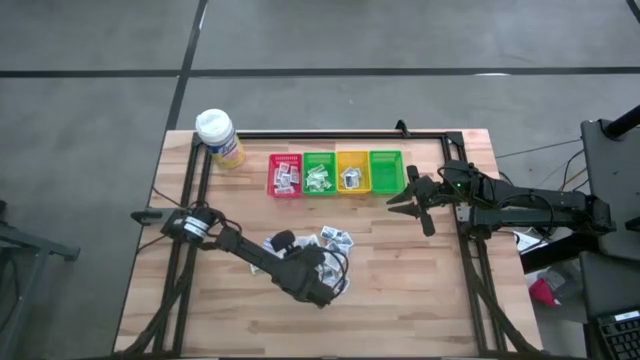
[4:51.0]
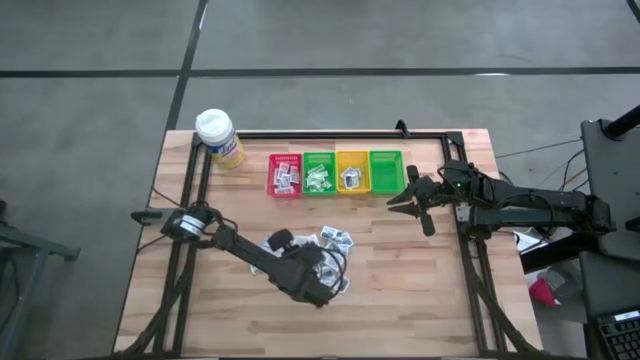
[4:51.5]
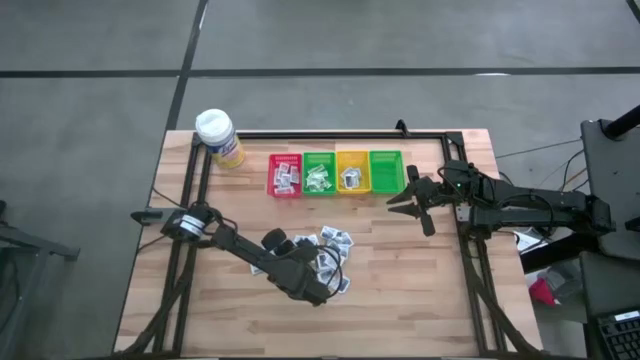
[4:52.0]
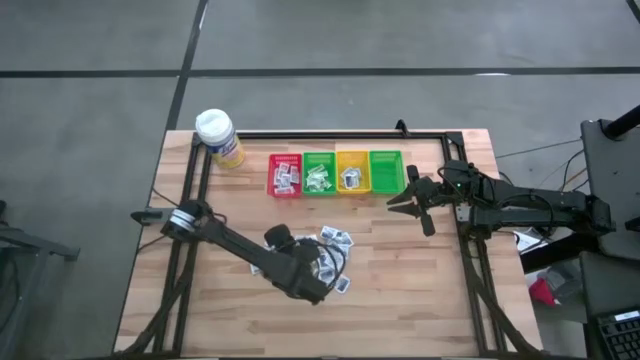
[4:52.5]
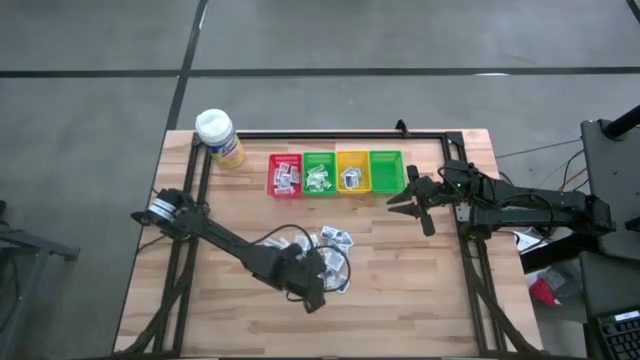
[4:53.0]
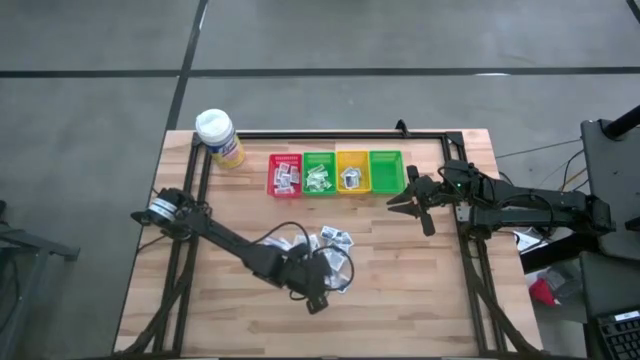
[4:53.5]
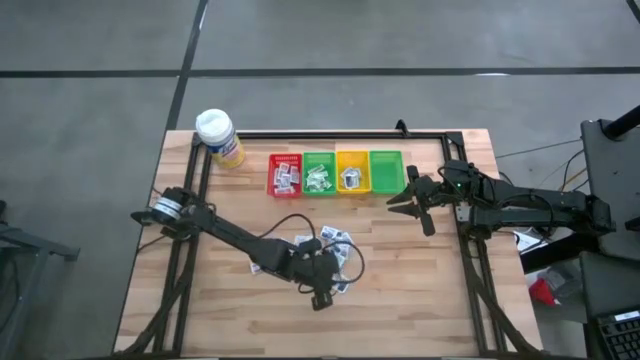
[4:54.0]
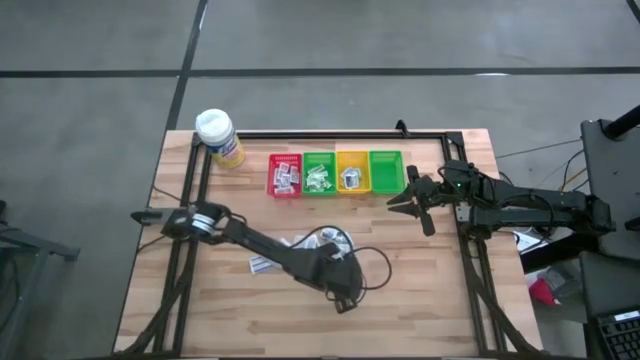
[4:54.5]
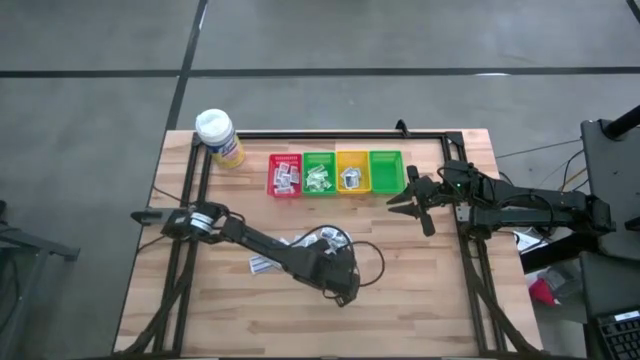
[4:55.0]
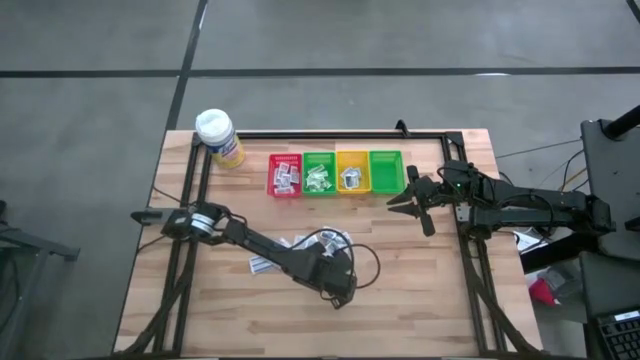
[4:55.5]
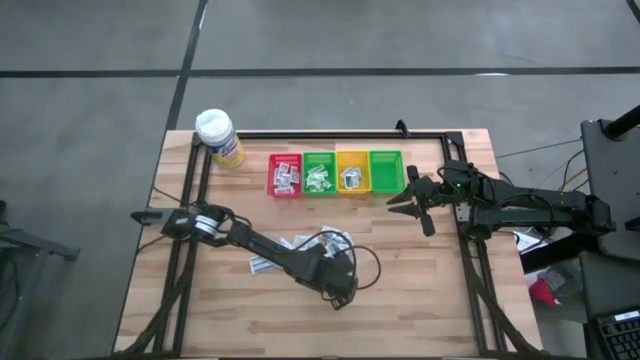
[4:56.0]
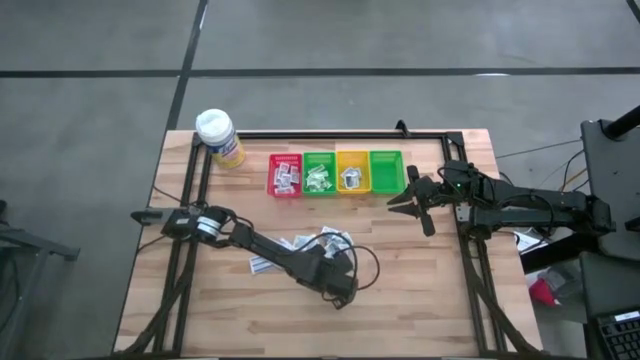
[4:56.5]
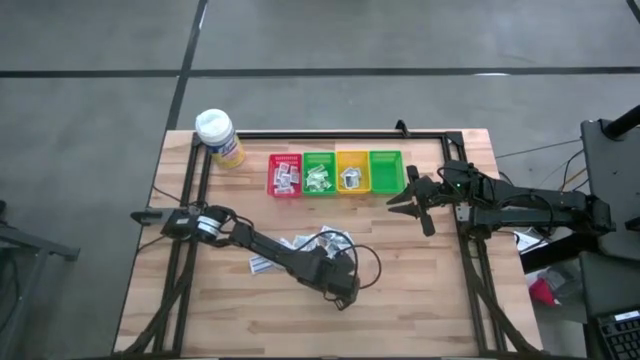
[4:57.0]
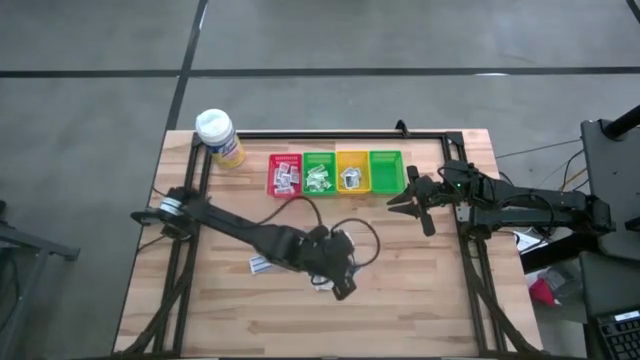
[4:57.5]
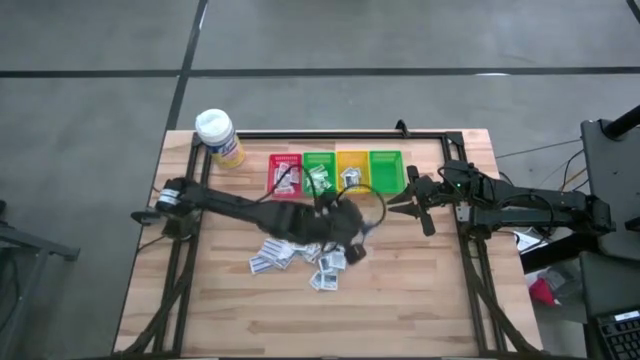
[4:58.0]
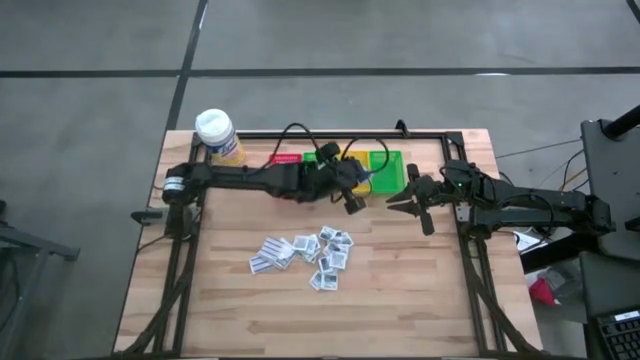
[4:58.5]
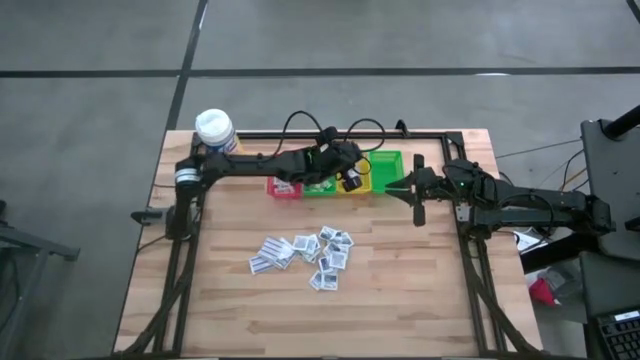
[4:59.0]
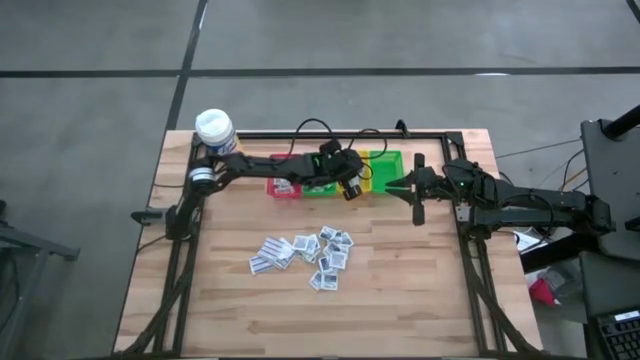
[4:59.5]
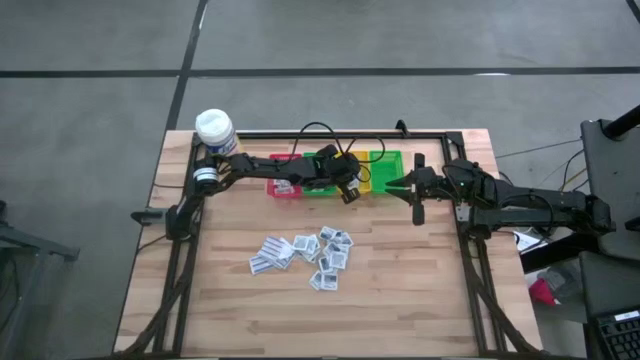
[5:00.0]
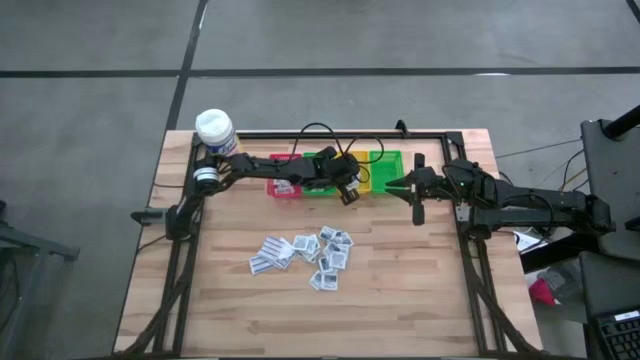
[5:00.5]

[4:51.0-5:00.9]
Task: Pick & Place First Aid Supplies
Put the alcohol pad into the yellow bin

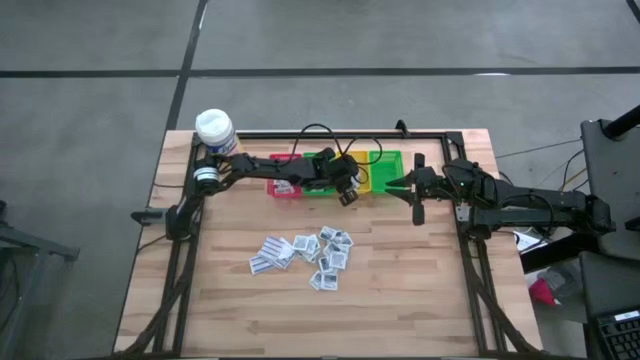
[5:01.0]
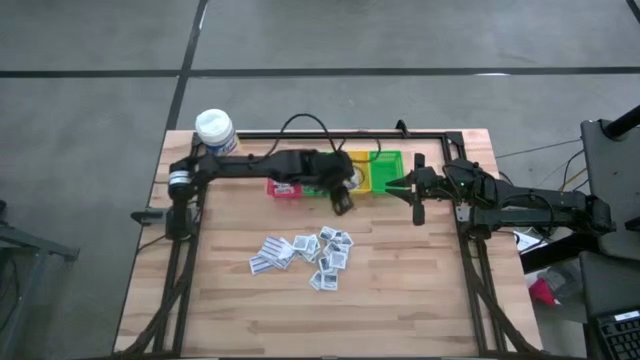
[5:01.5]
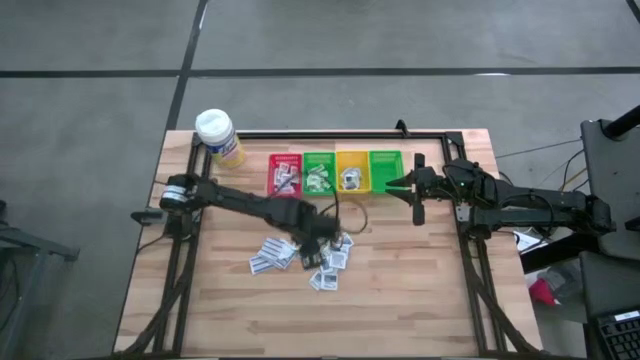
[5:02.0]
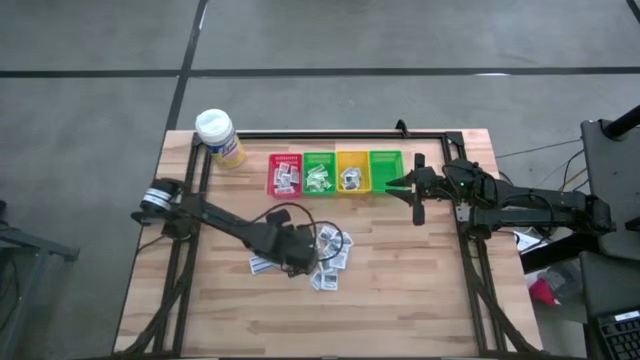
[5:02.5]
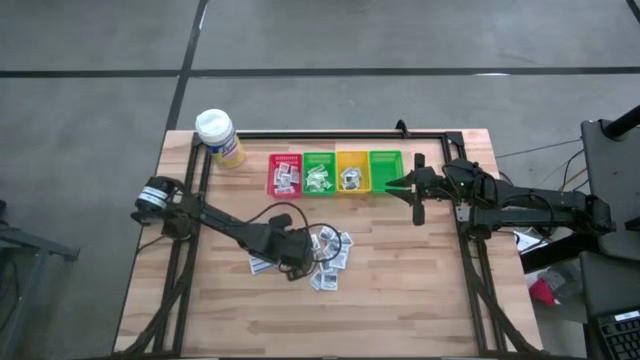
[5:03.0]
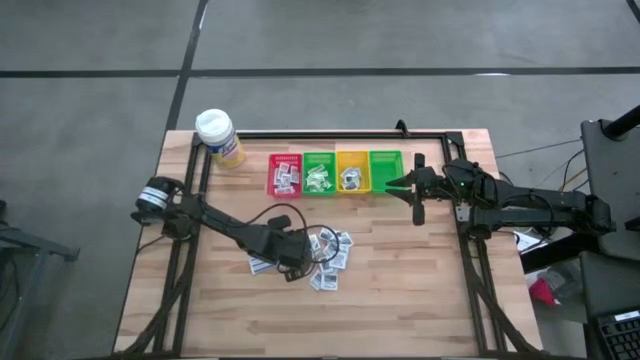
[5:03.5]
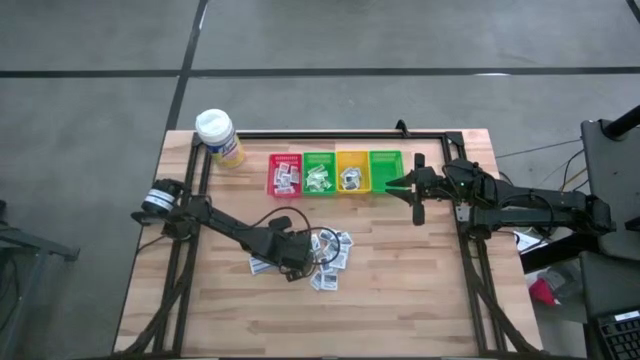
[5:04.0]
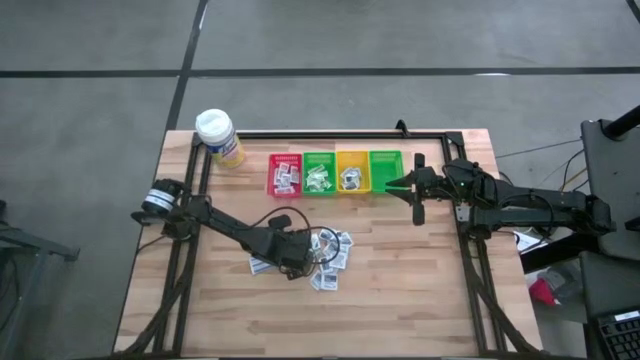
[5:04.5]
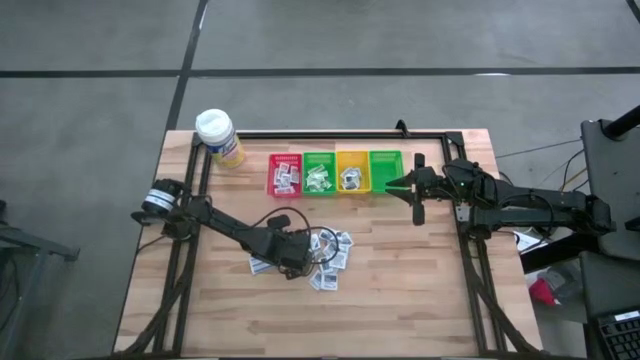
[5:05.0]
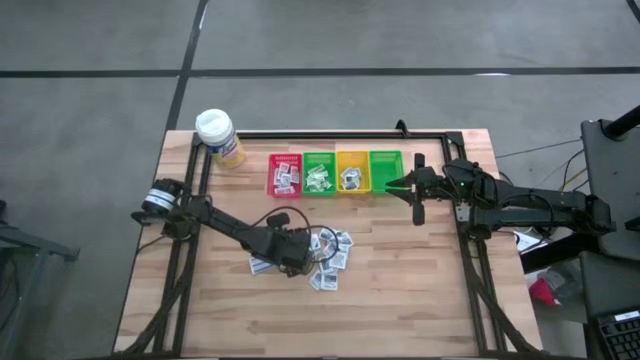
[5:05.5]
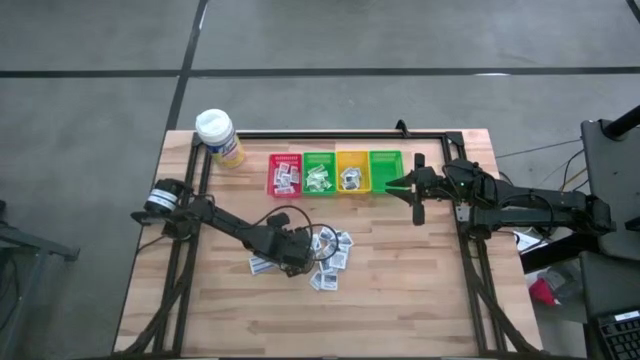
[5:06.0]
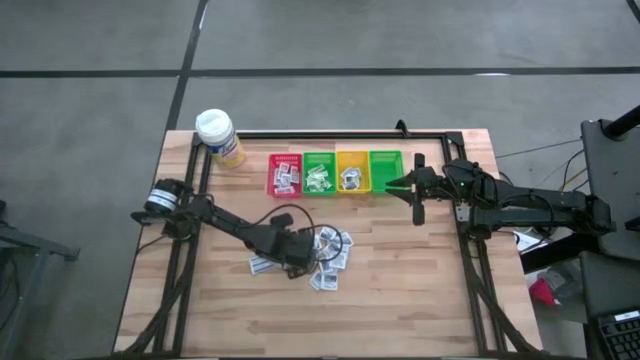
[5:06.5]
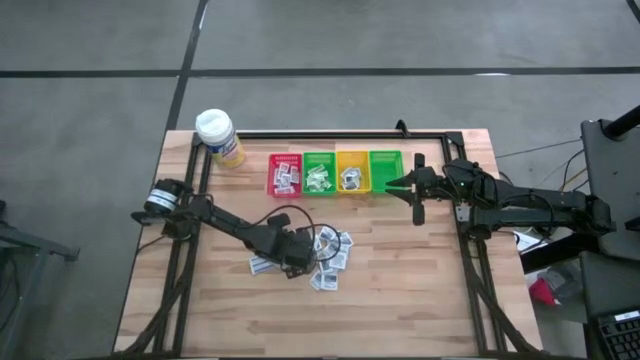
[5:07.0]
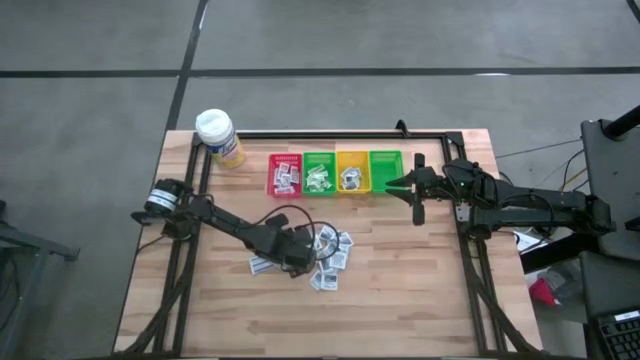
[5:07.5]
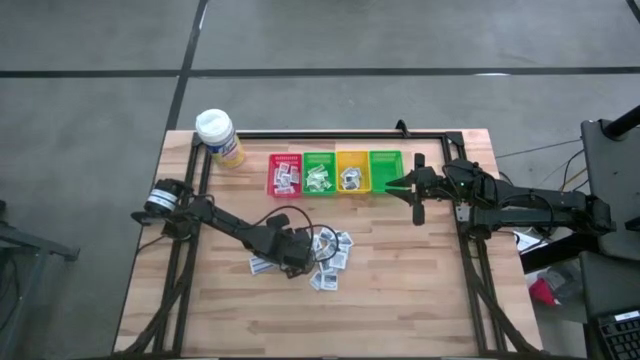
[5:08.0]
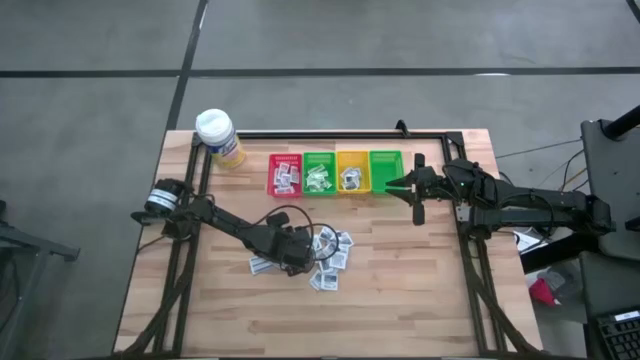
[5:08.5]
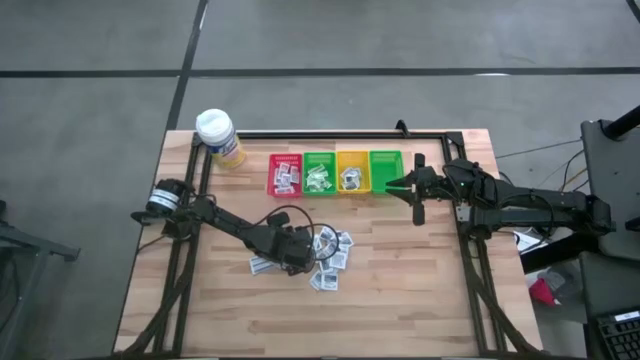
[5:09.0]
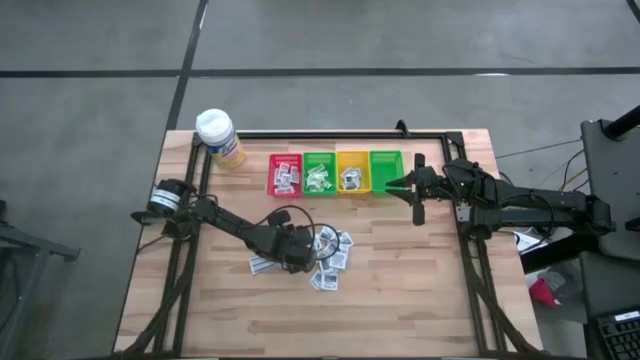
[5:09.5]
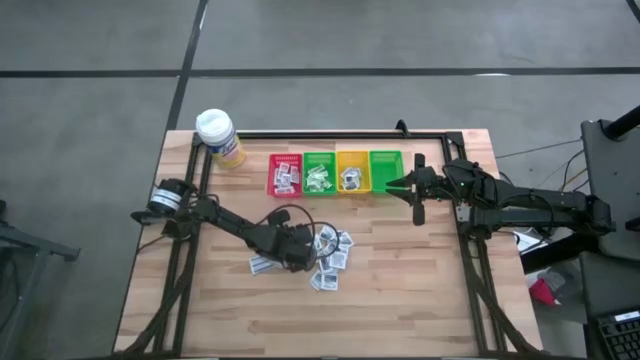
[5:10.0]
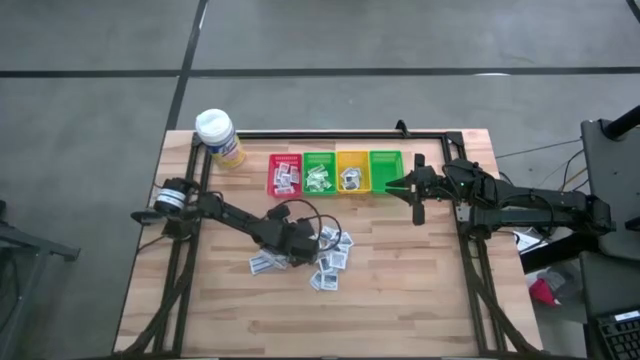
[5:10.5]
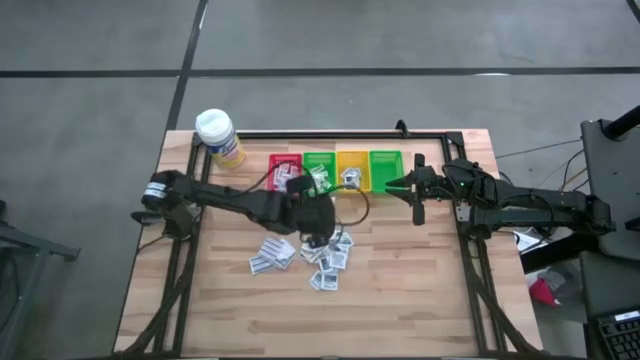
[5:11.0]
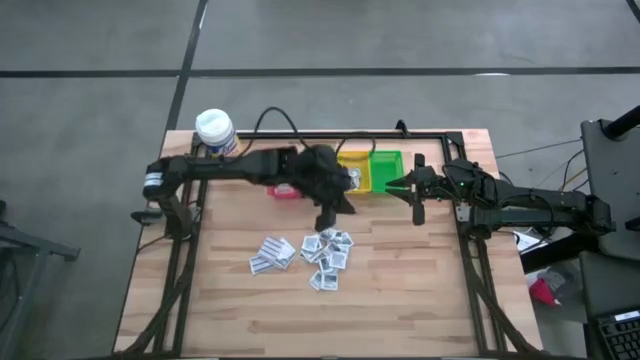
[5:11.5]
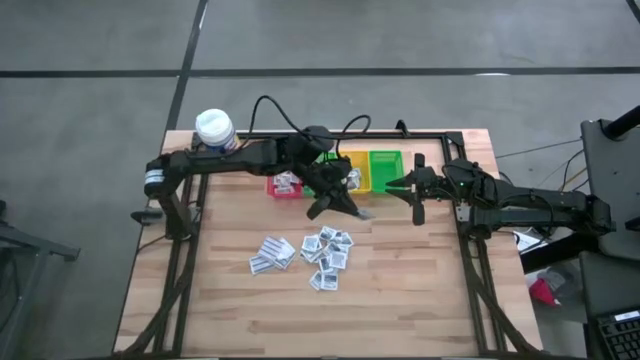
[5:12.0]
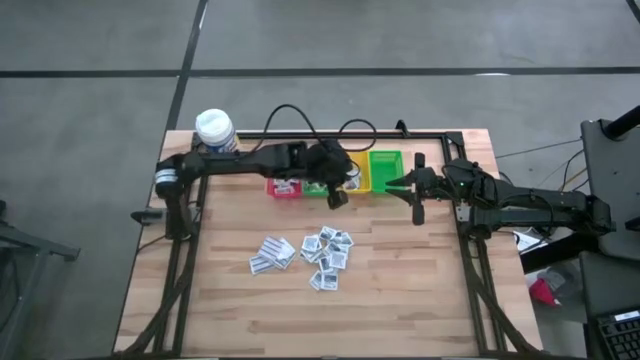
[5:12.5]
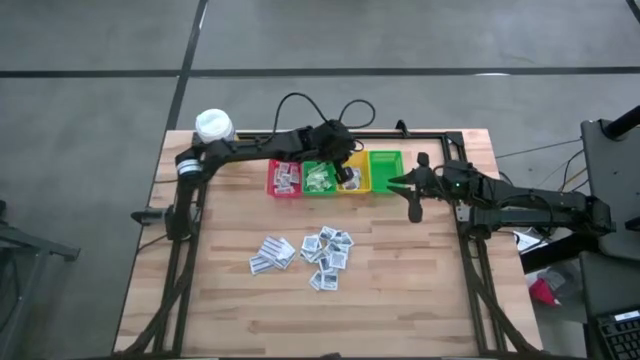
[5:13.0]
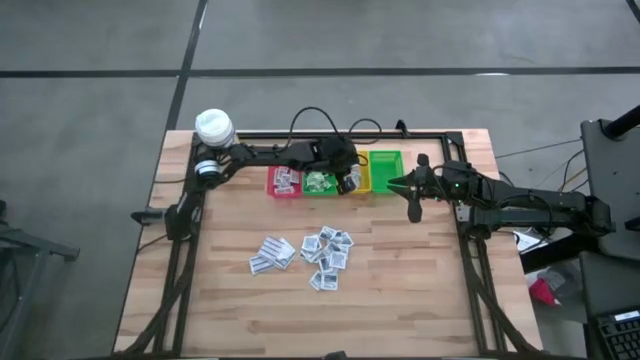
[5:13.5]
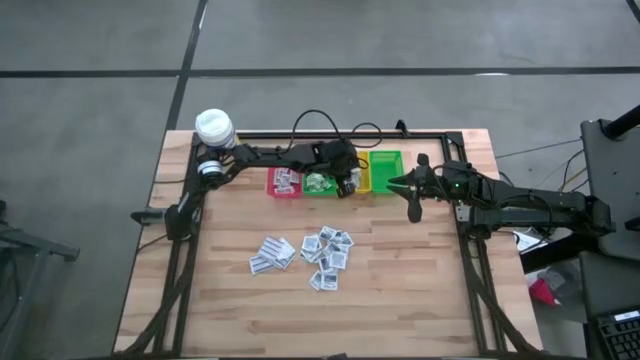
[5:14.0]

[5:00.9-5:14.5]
Put the alcohol pad into the yellow bin
